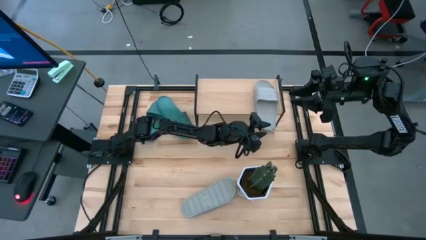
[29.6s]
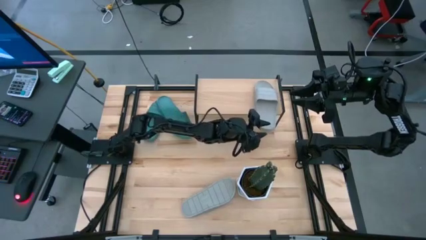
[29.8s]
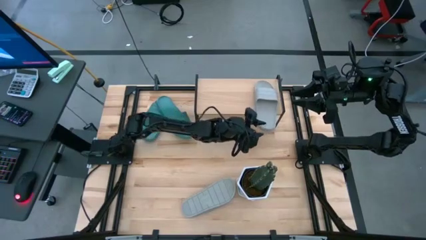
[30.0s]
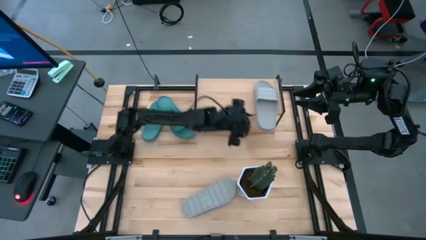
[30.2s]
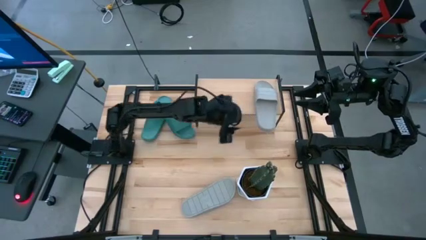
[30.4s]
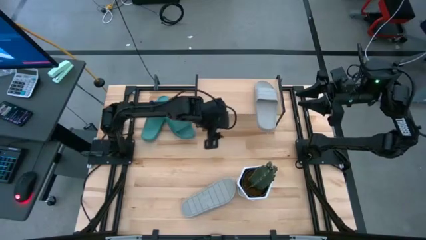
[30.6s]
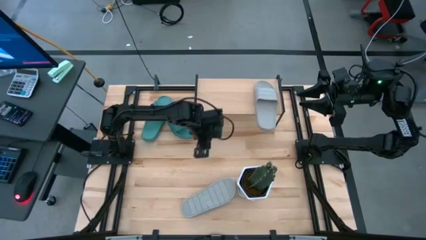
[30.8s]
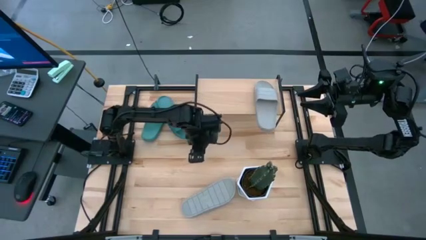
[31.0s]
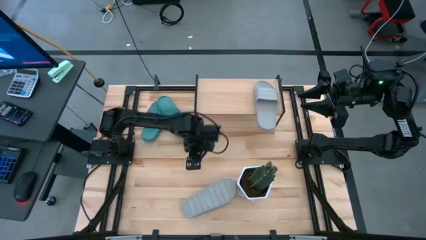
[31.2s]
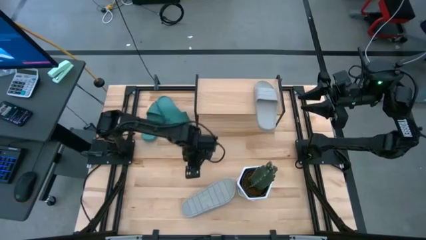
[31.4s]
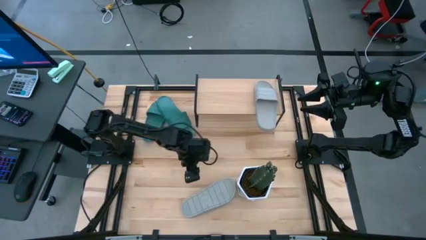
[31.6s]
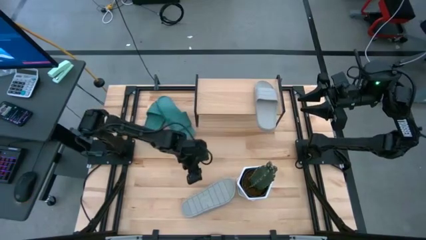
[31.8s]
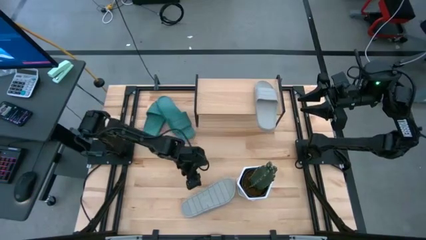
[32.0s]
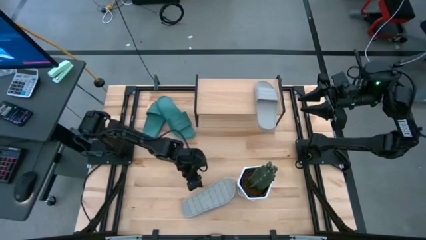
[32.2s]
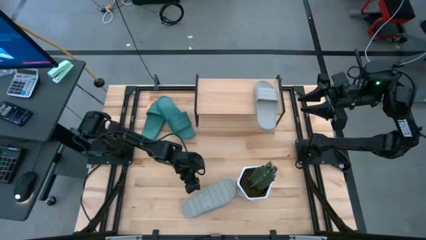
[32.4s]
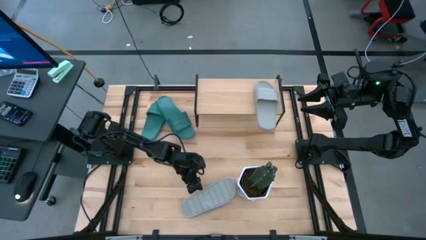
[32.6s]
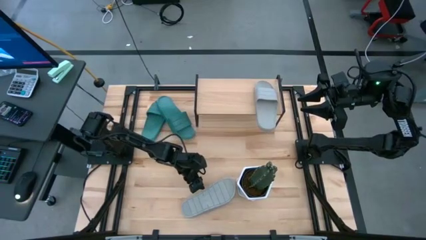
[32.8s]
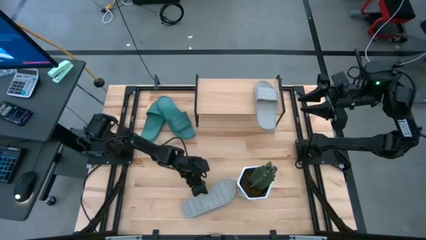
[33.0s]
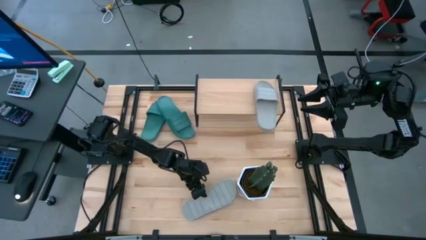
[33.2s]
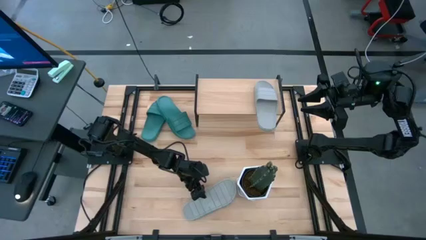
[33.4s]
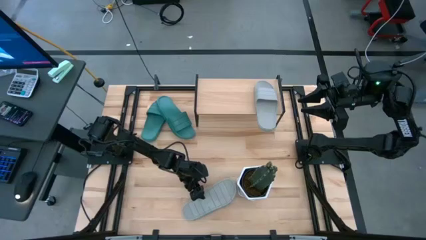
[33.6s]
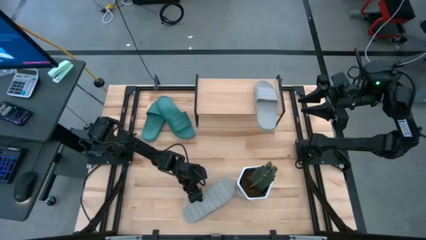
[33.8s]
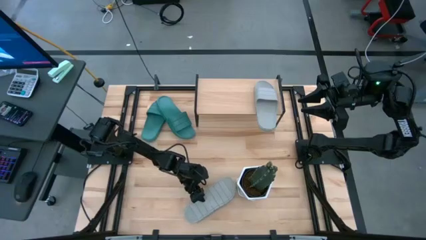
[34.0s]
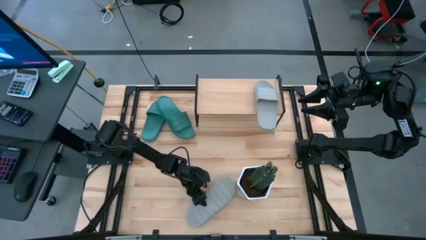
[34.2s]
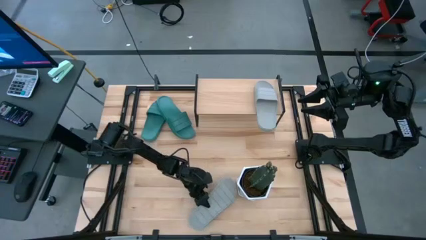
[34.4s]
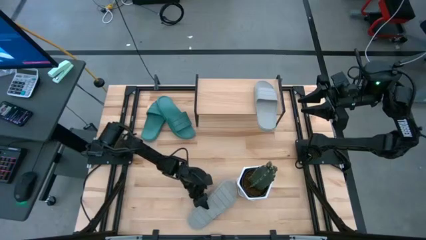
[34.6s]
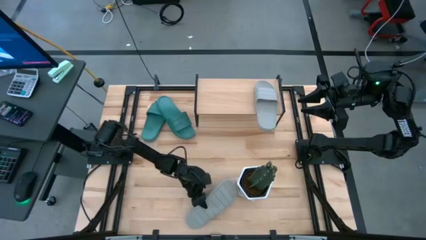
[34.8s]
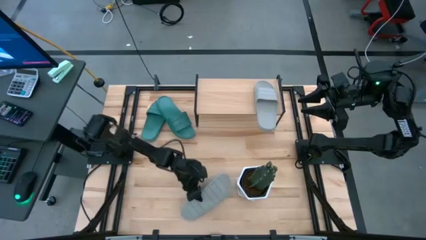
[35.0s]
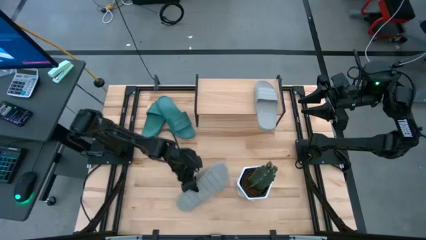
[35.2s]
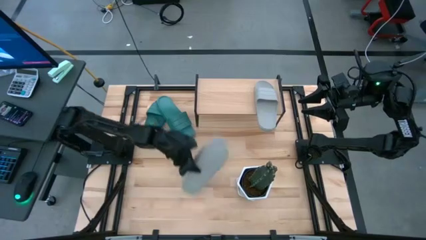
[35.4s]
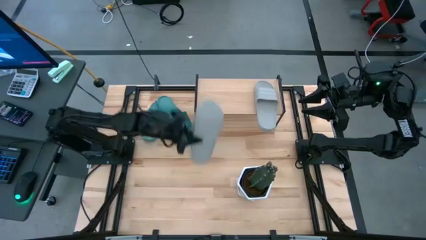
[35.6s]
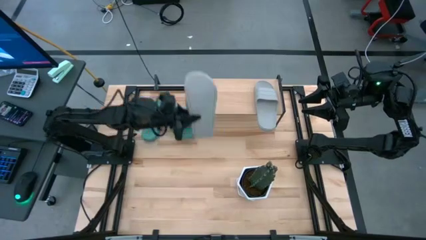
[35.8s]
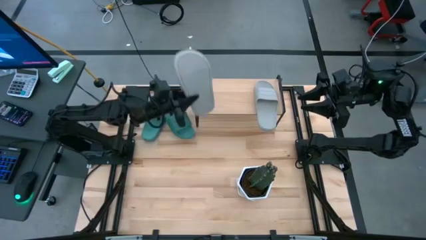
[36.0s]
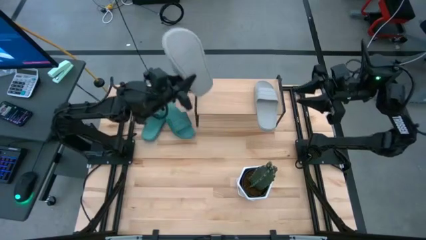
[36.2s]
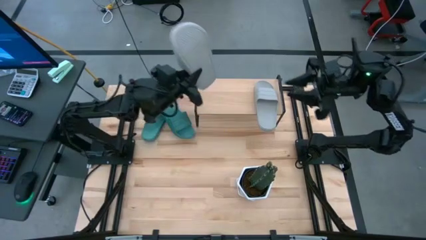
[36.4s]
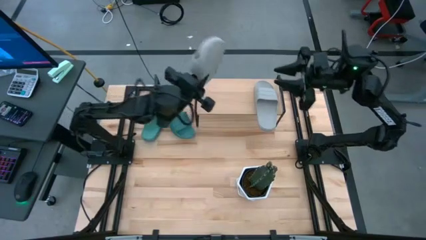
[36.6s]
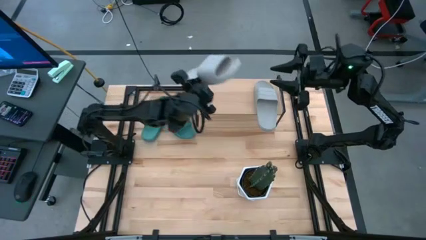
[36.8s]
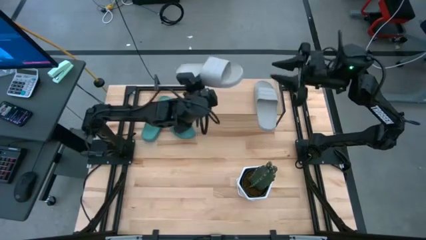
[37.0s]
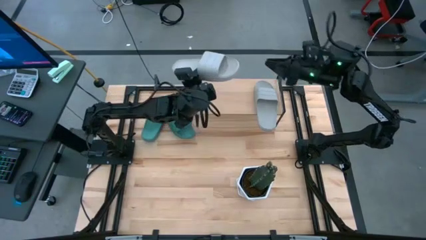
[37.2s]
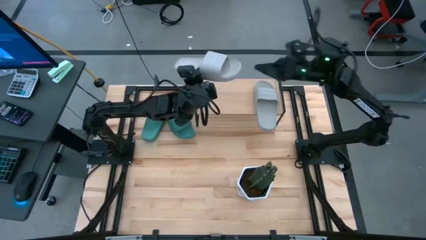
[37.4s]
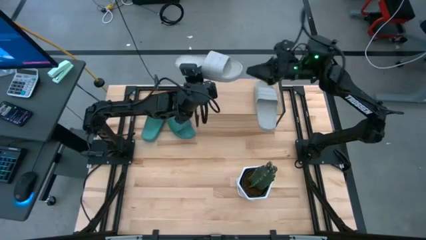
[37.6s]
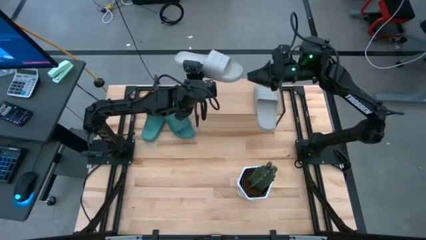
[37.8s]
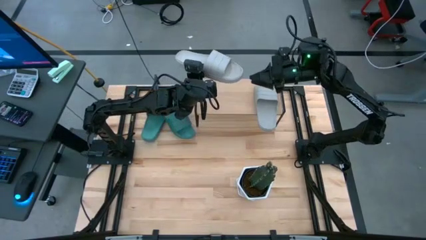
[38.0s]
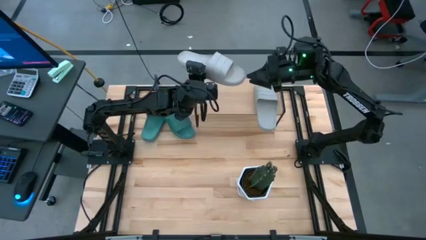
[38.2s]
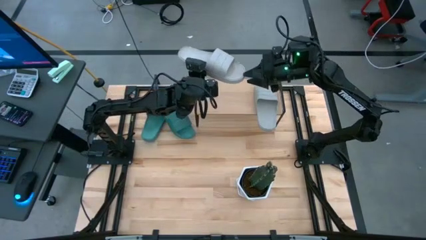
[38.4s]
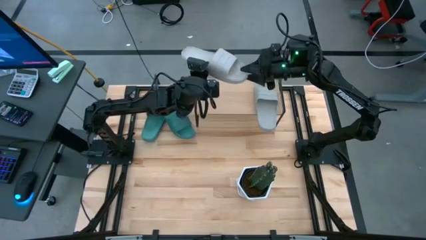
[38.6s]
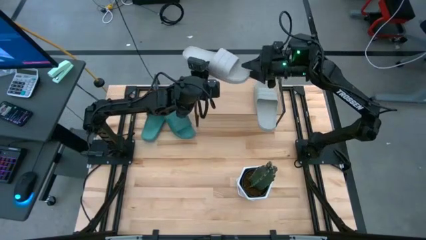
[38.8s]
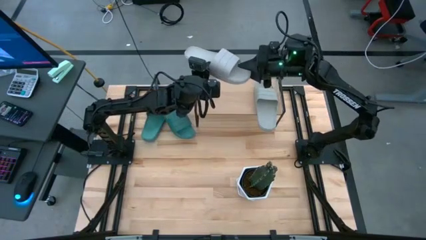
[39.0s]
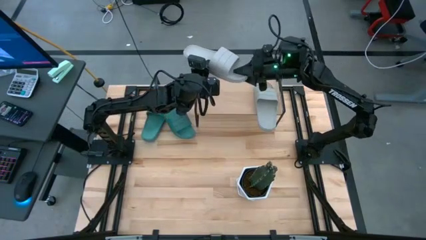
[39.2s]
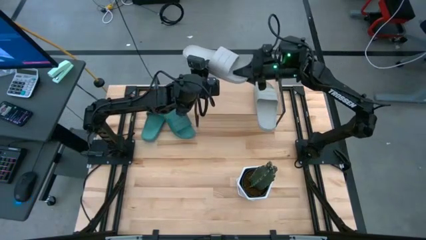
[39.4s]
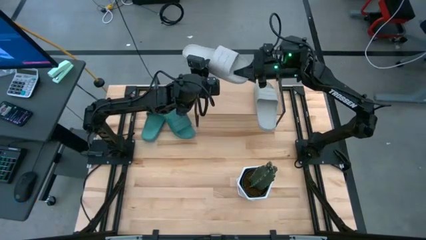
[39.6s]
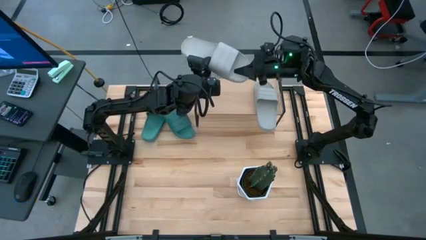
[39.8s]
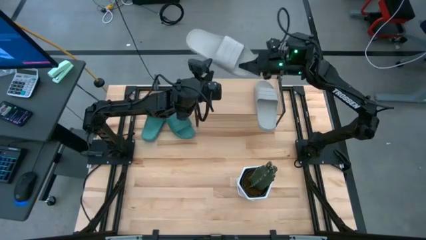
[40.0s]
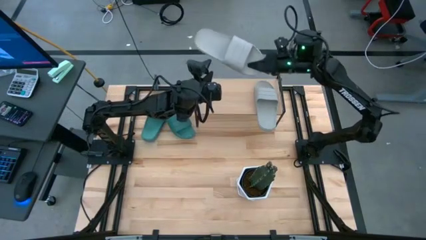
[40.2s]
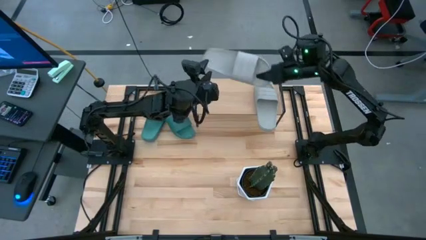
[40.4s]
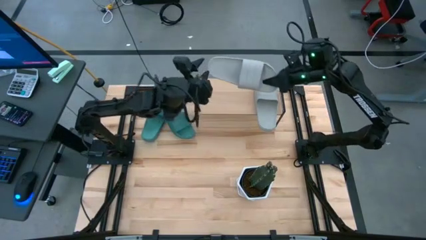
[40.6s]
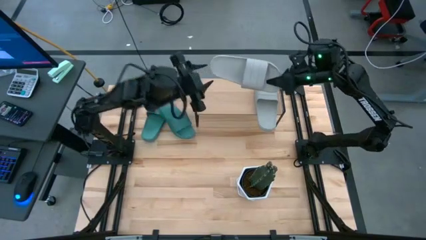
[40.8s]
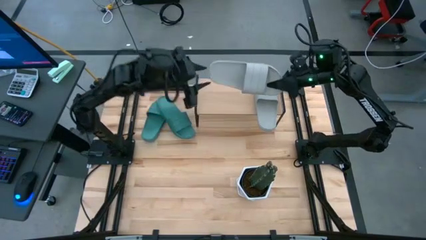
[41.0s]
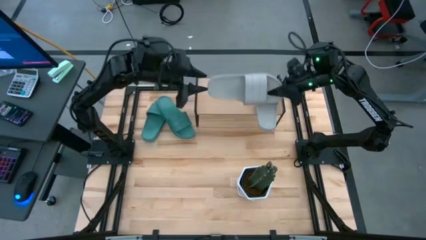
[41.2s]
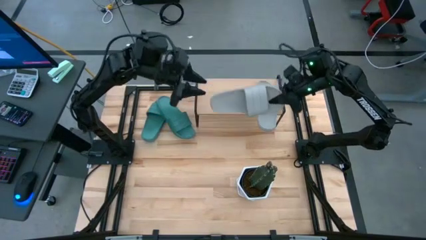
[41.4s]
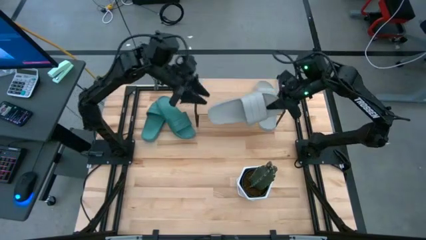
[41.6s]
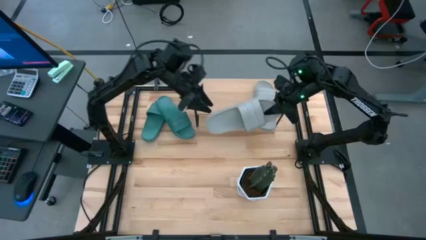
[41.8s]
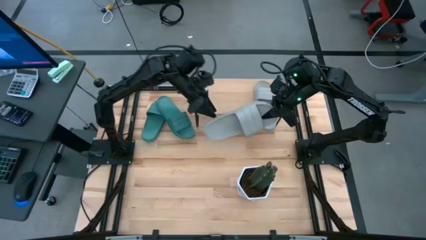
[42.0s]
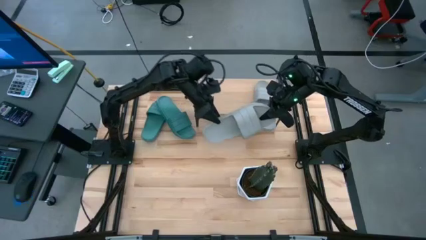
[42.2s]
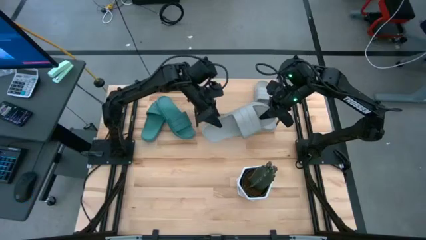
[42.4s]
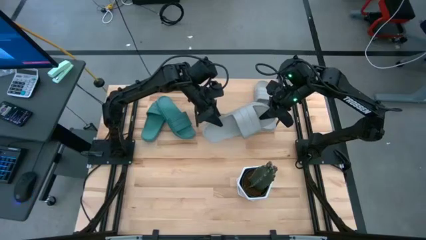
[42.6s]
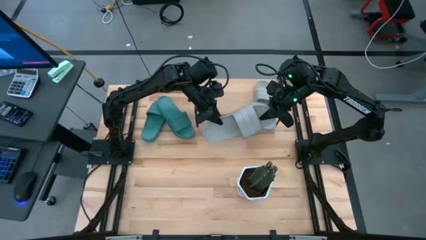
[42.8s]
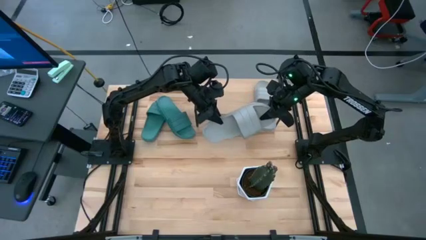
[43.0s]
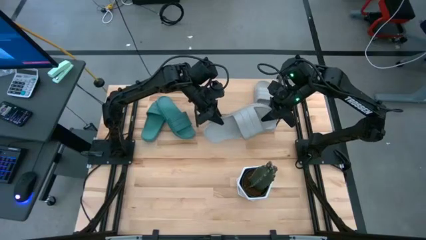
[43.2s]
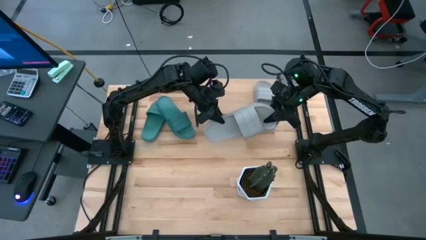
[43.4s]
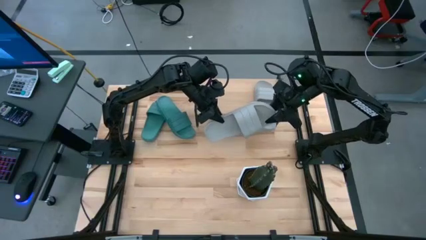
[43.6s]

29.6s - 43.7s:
Task: Pick and place slides into the shelf
Put the gray slipper on the shelf
